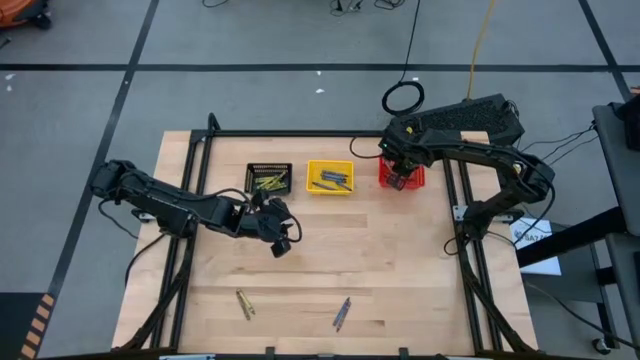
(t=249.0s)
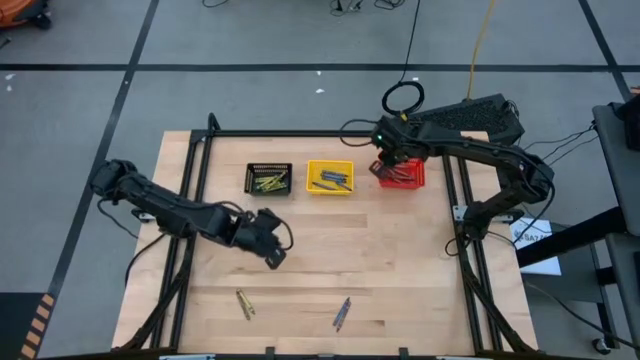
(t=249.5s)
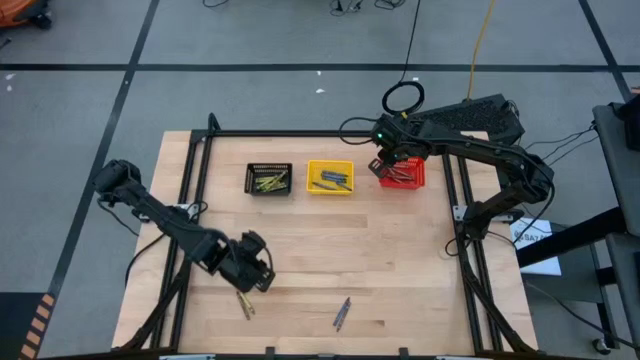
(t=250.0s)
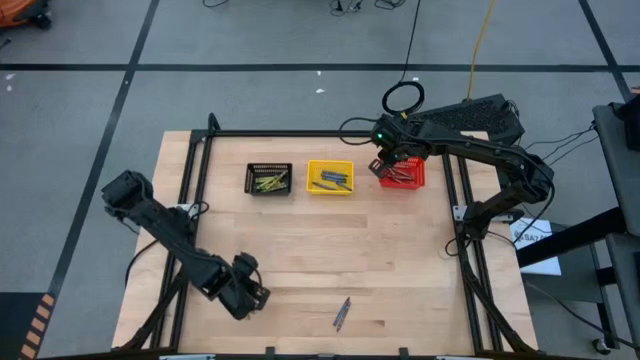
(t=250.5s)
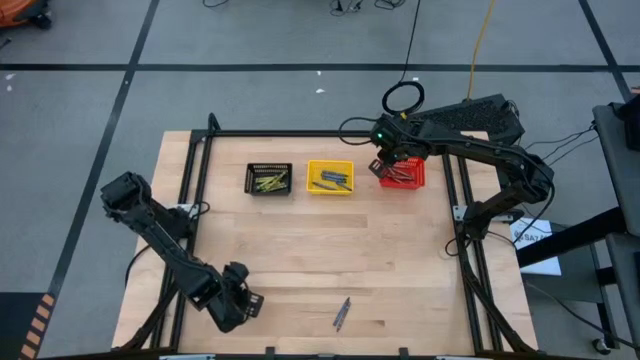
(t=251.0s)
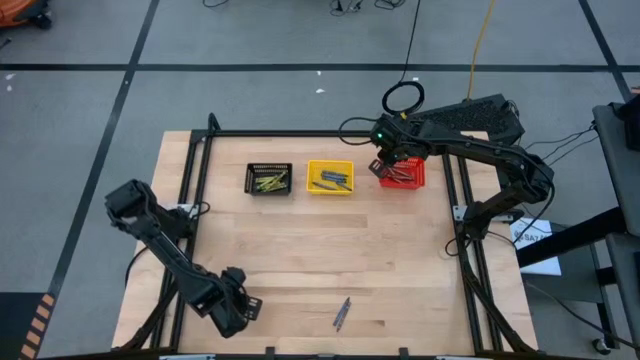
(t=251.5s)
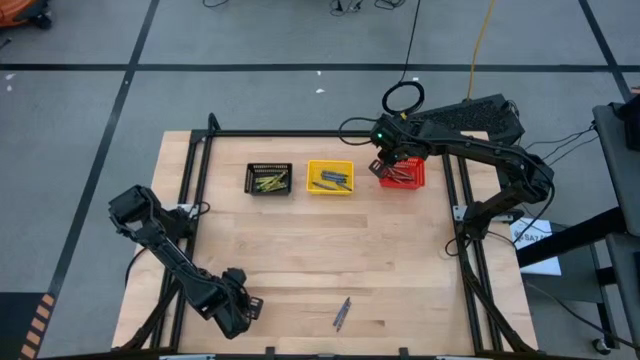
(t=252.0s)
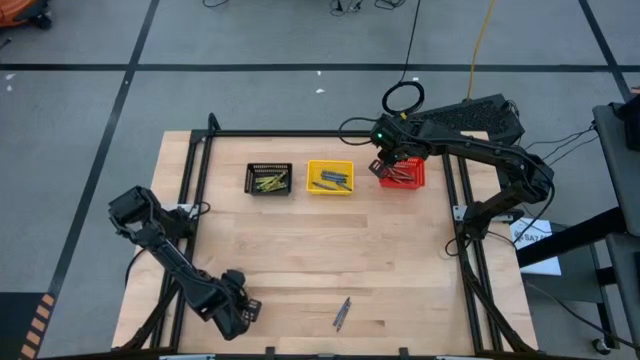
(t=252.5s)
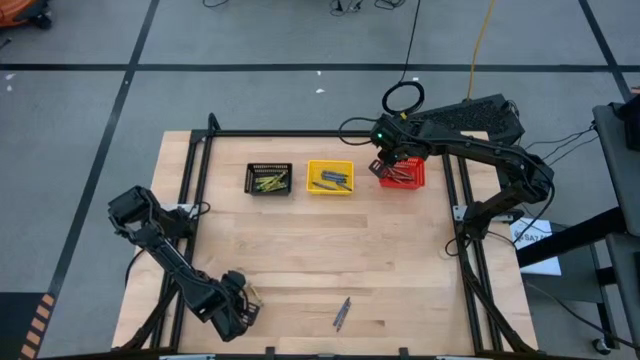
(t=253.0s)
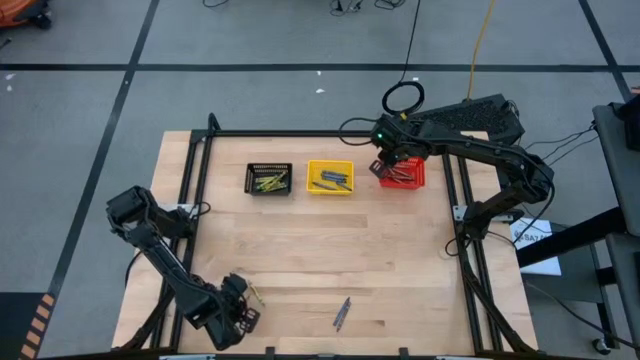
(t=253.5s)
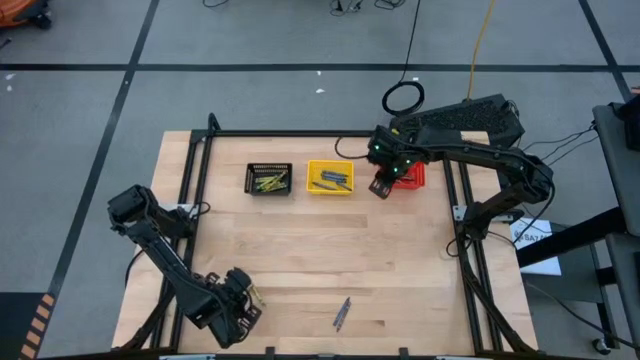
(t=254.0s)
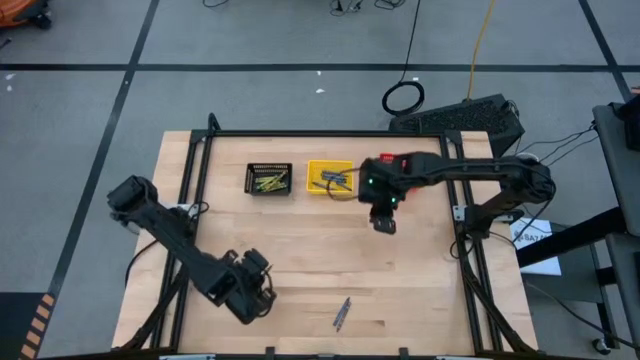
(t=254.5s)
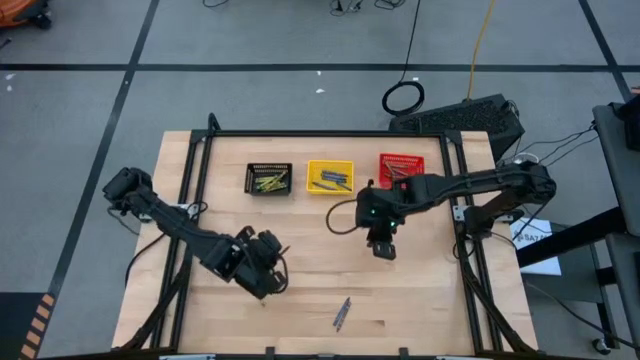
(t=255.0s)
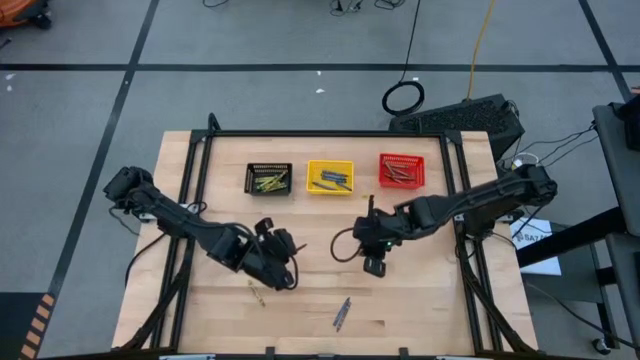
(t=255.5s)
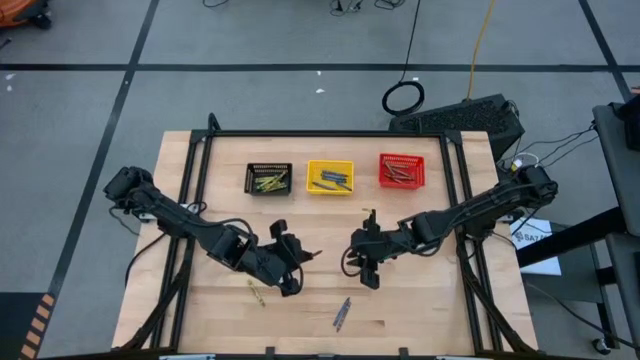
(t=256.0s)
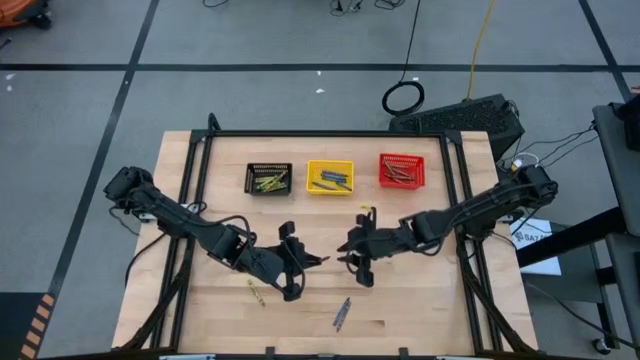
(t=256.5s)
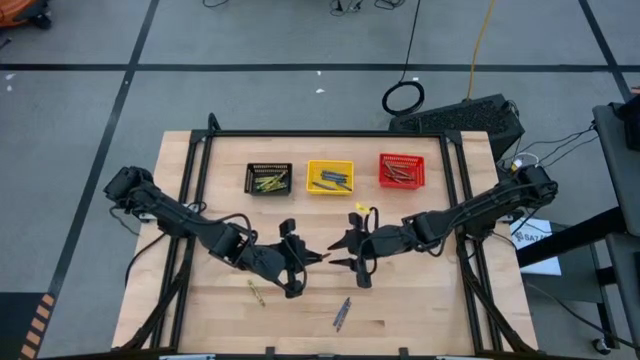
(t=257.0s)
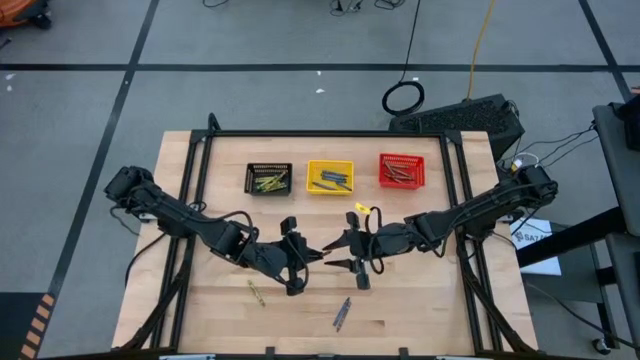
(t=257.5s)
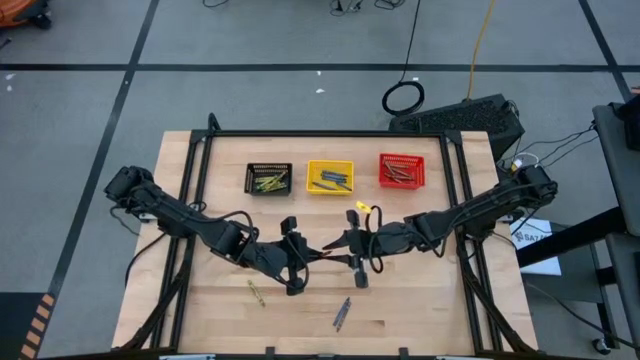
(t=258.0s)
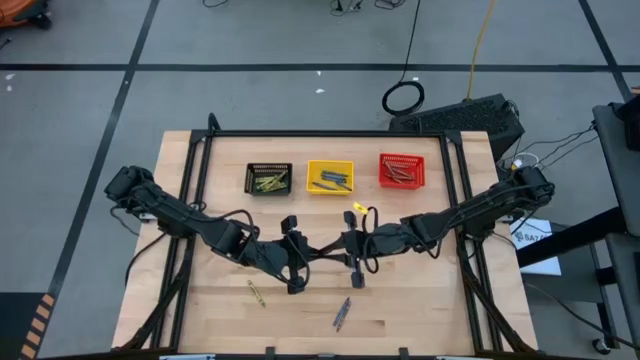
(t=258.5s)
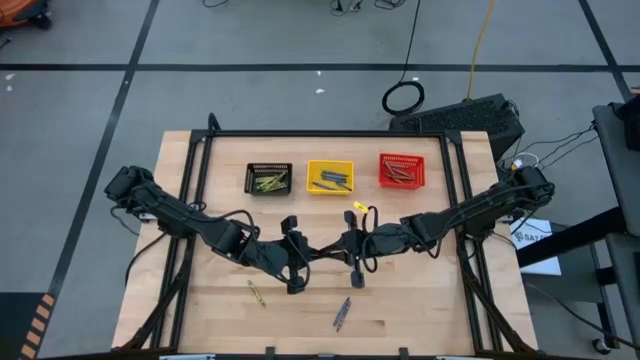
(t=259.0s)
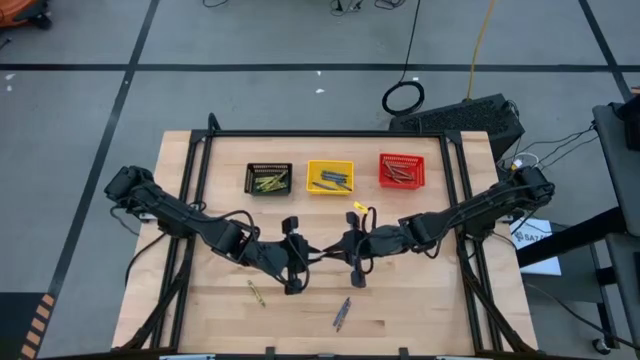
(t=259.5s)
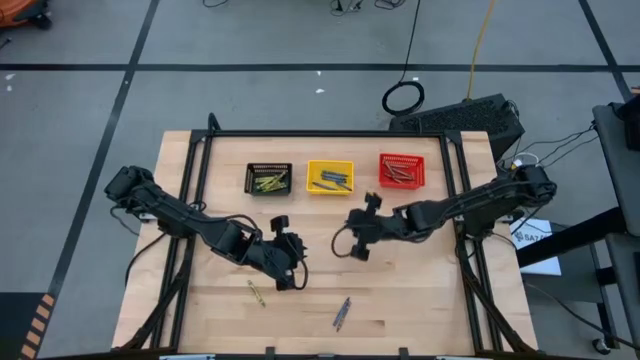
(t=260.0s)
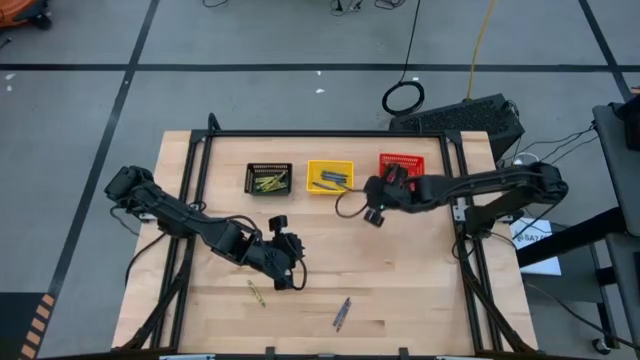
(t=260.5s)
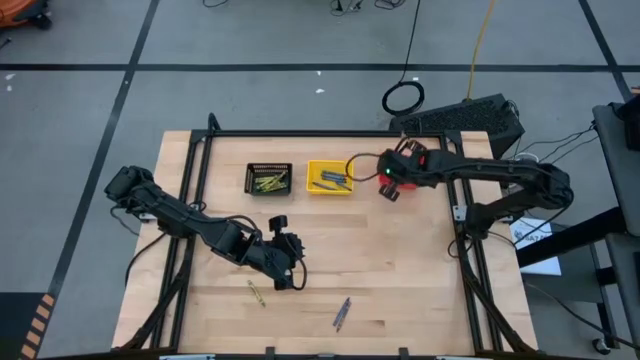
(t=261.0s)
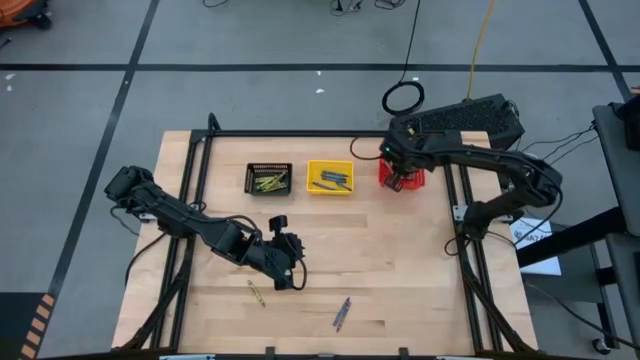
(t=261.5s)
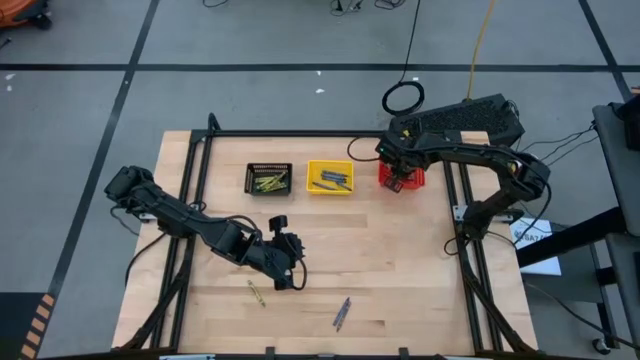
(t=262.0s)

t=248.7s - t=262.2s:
Task: Sort crayons
Put the brown crayon into the red bin

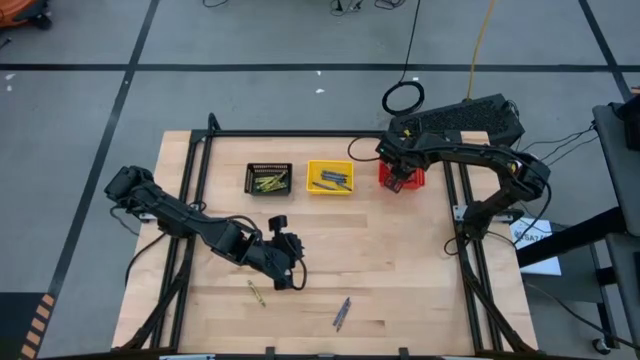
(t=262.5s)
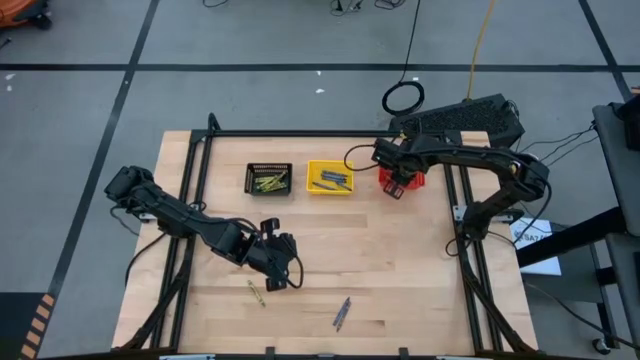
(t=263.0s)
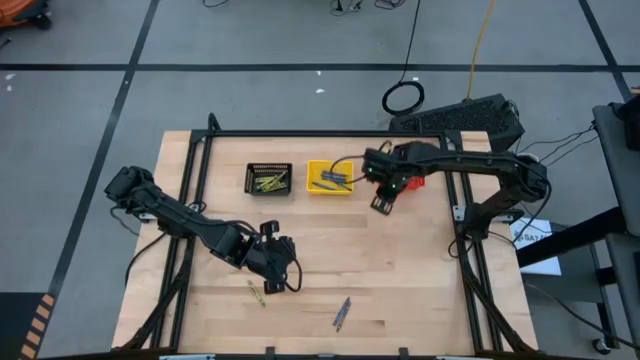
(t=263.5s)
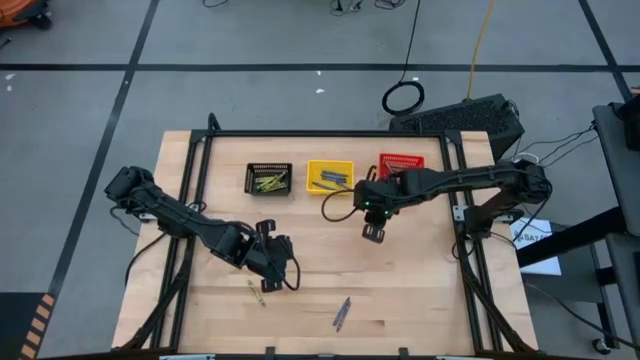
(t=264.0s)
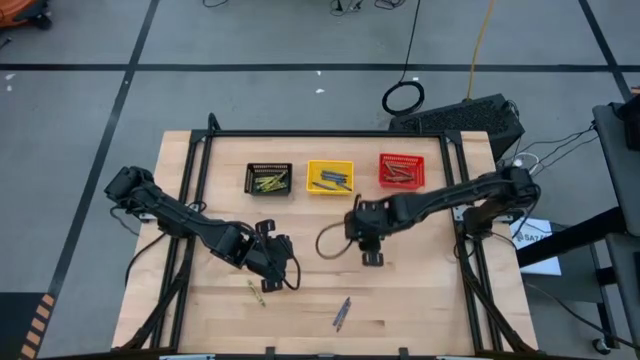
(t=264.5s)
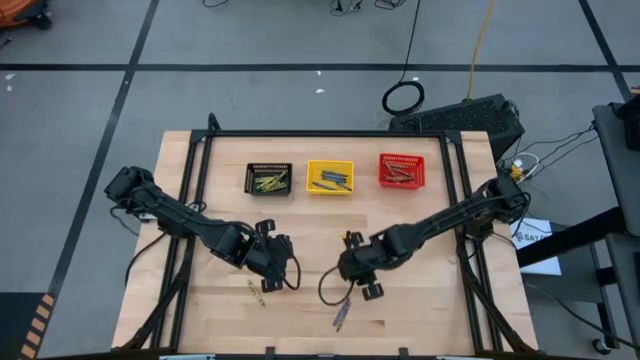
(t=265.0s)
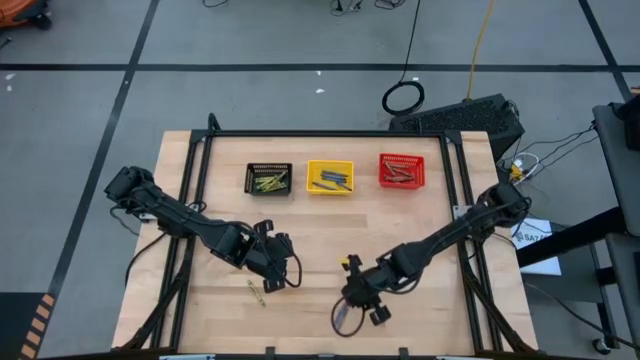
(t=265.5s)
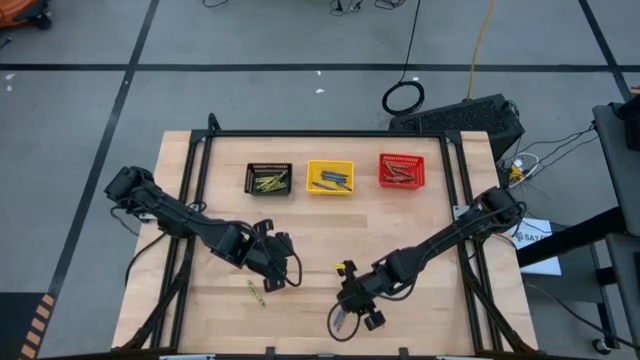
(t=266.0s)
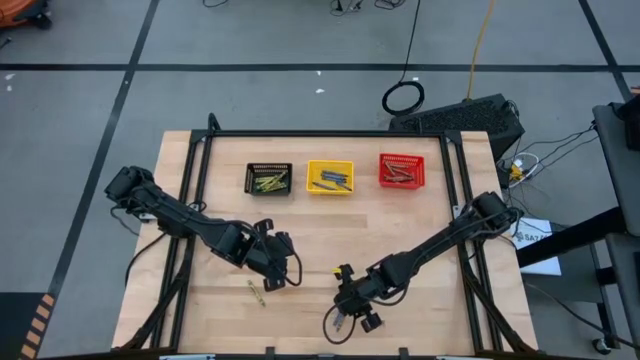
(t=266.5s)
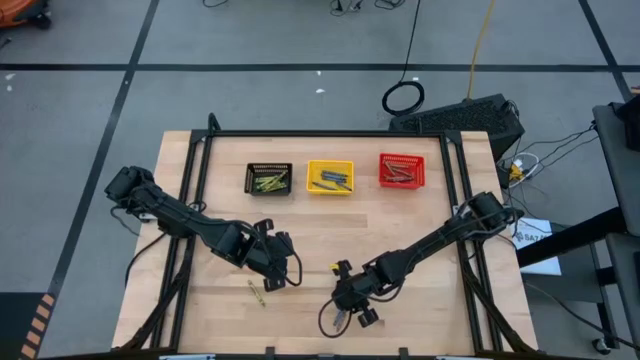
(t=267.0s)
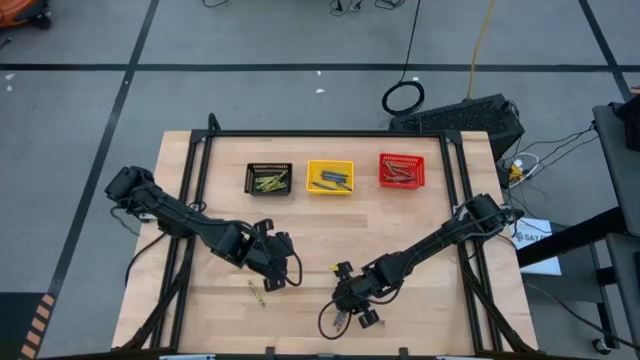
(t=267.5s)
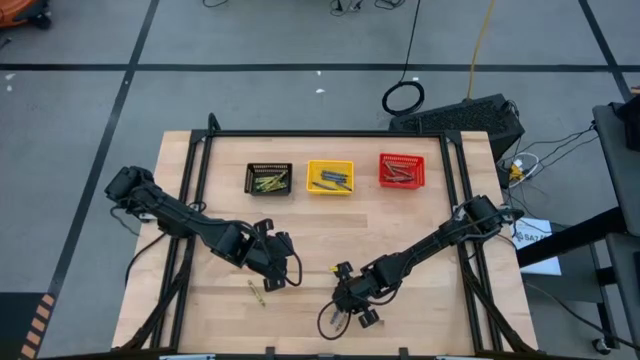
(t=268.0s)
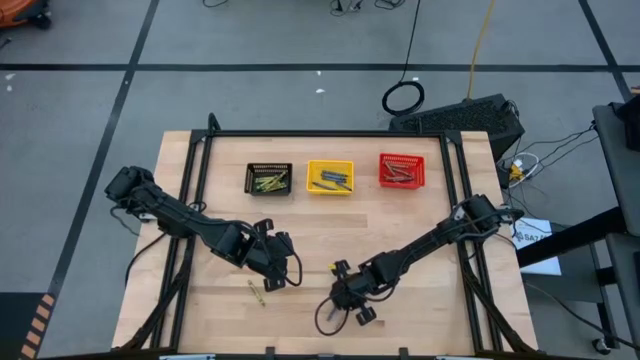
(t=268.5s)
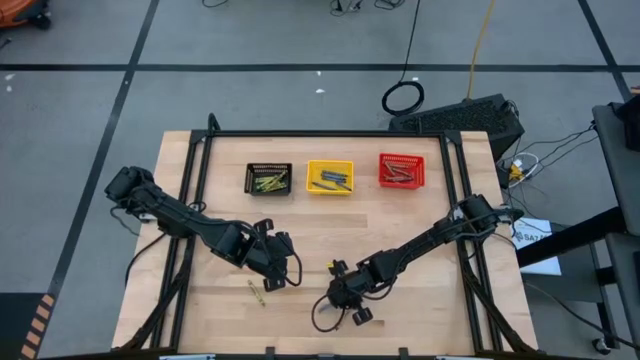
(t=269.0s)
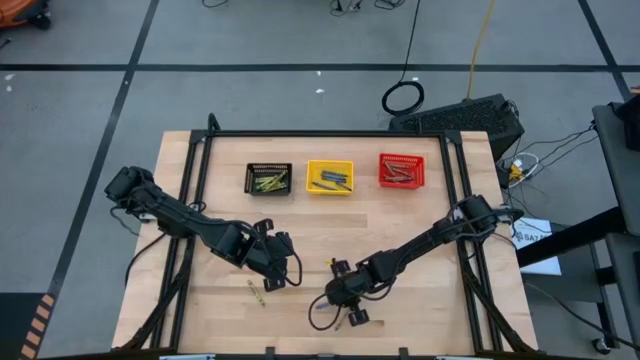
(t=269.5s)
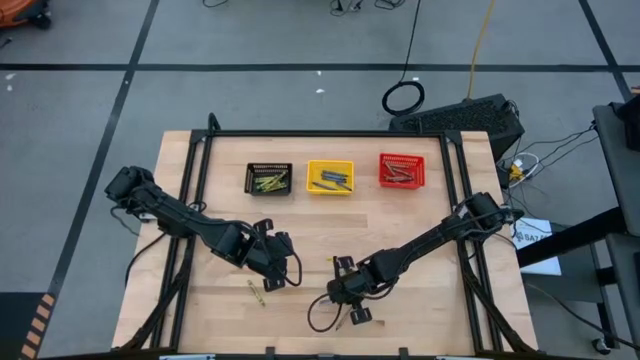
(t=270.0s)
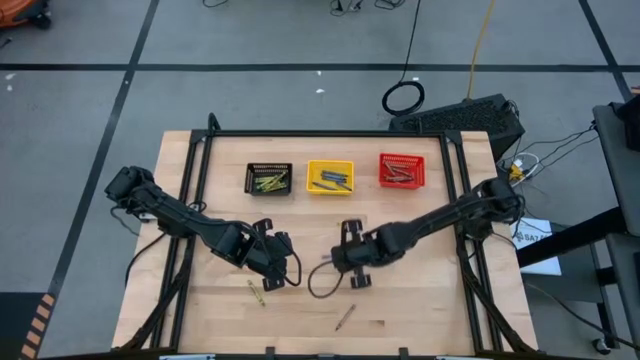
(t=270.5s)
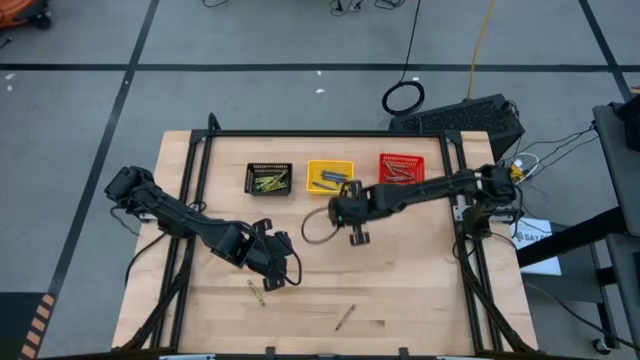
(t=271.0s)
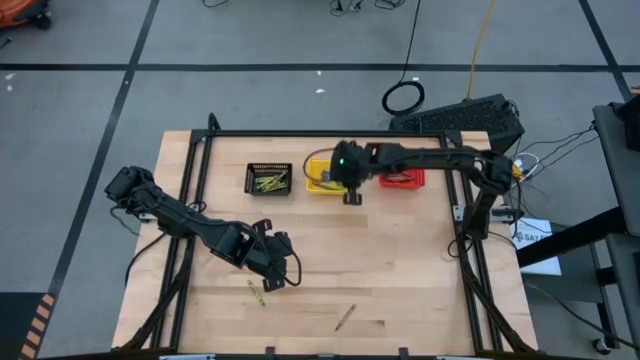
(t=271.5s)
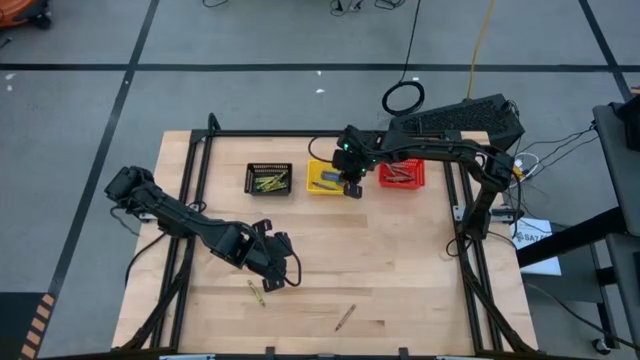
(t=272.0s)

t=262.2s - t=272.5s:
Put the blue crayon into the yellow bin
